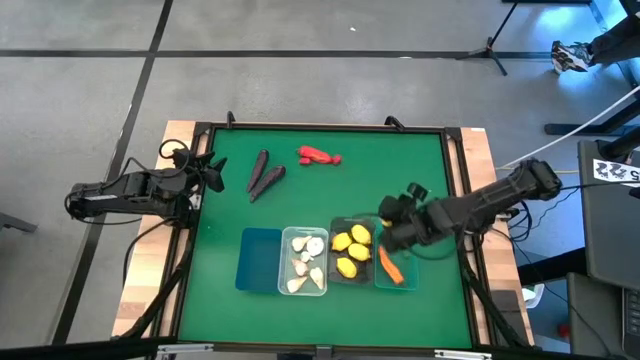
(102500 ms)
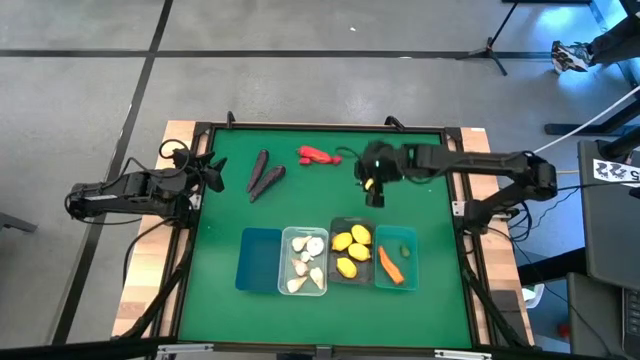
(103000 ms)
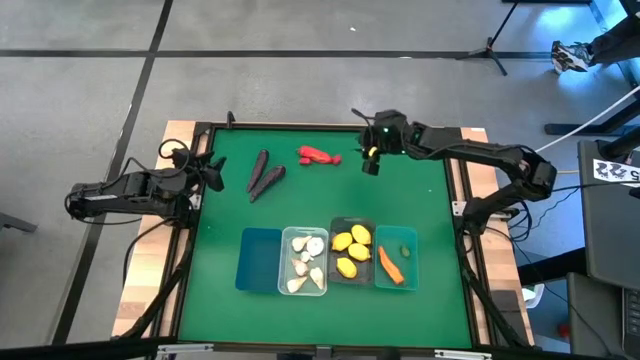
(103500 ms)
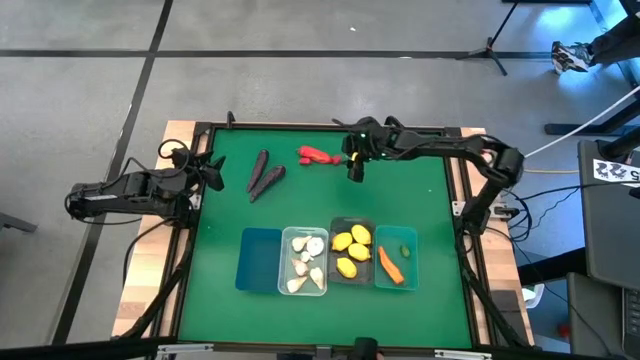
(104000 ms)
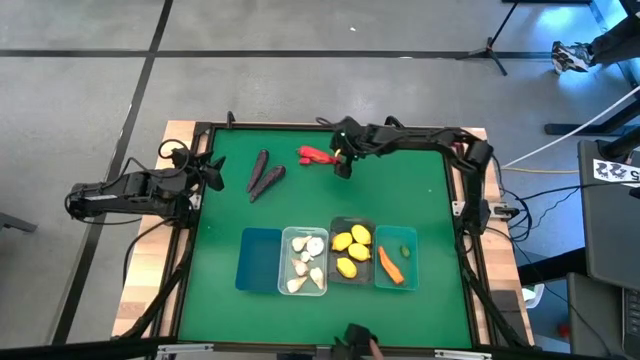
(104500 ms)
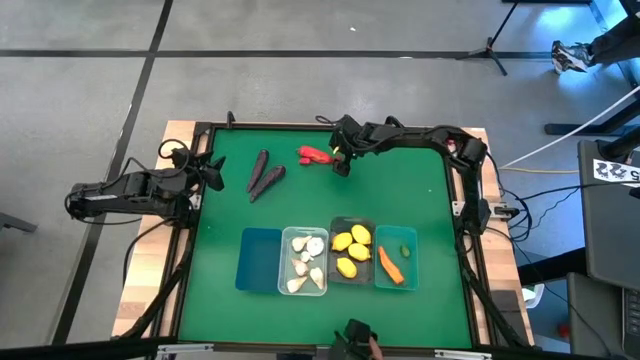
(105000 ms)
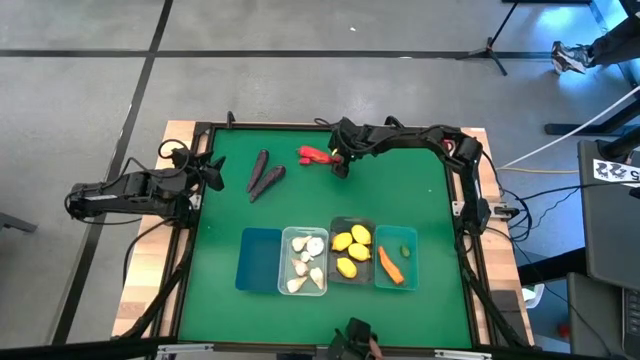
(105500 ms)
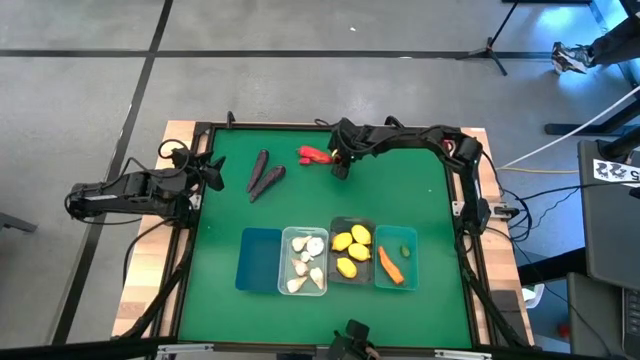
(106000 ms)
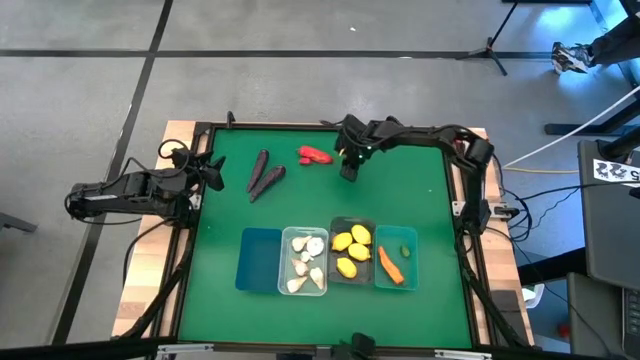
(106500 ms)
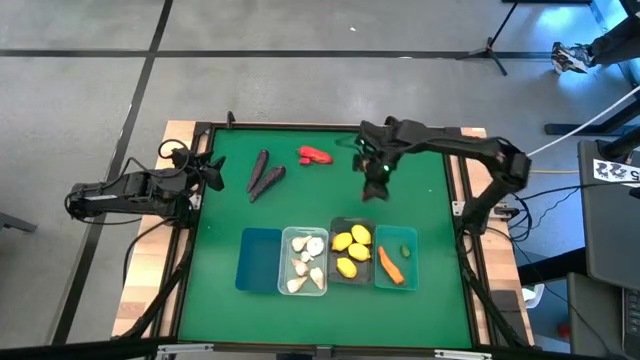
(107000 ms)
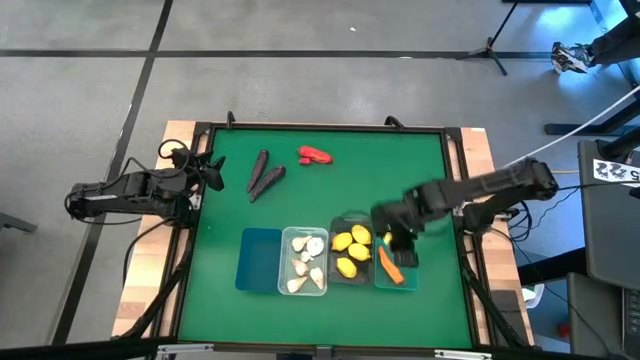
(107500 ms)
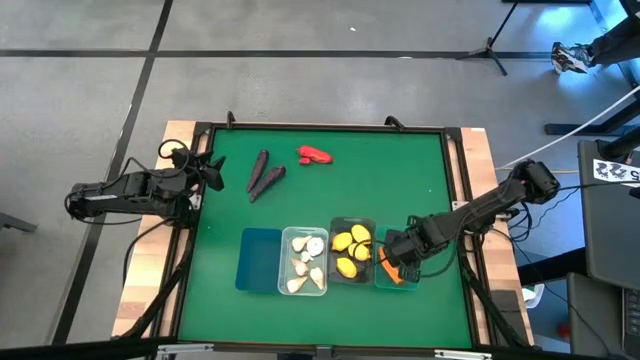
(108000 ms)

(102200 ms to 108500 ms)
Task: Sort produce into baskets
Put the red chili pepper into the light blue bin

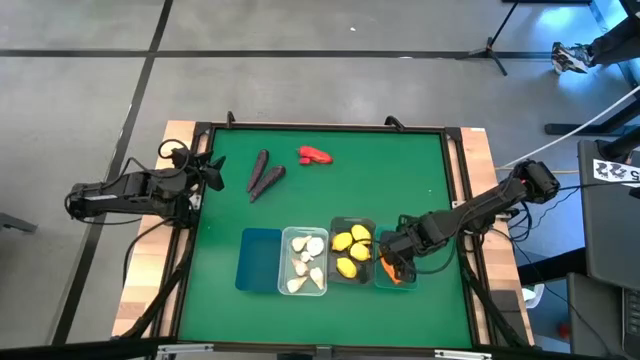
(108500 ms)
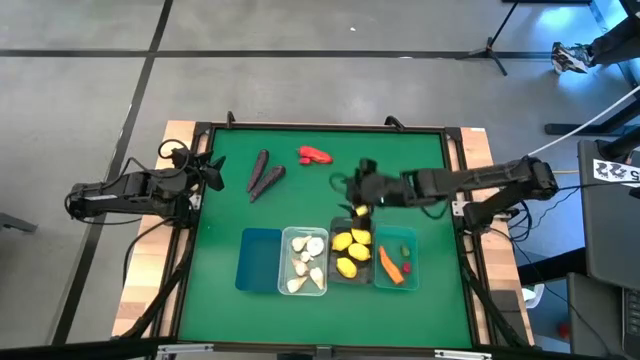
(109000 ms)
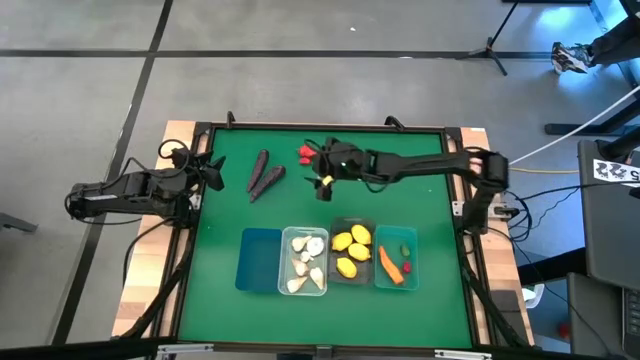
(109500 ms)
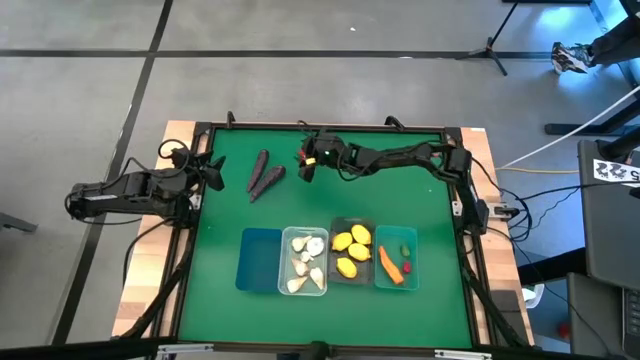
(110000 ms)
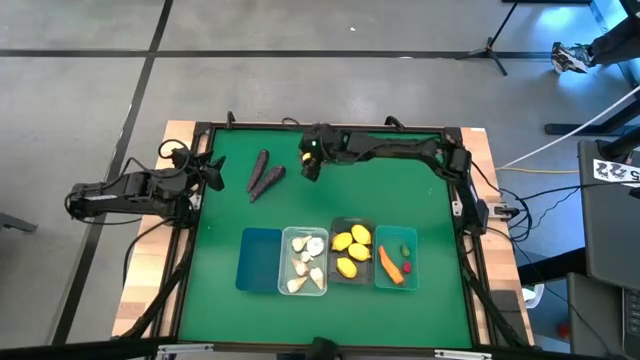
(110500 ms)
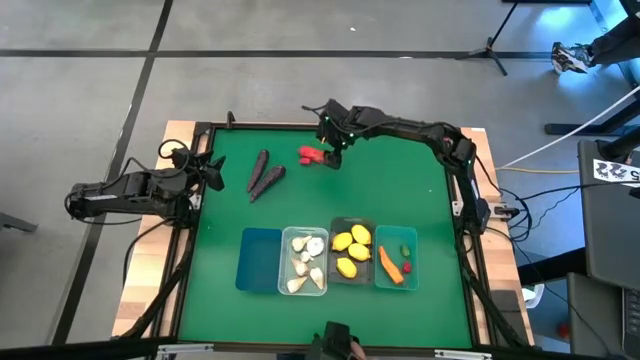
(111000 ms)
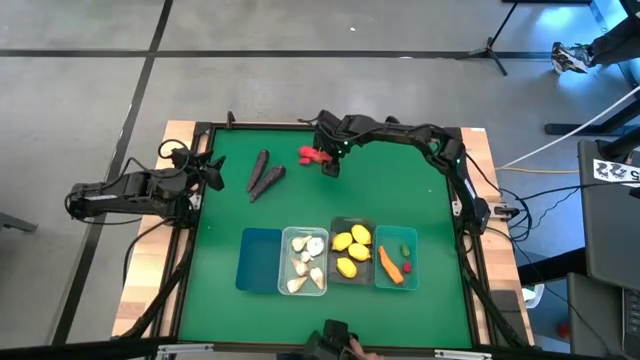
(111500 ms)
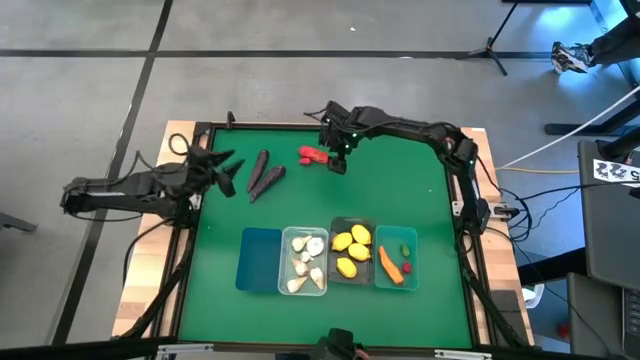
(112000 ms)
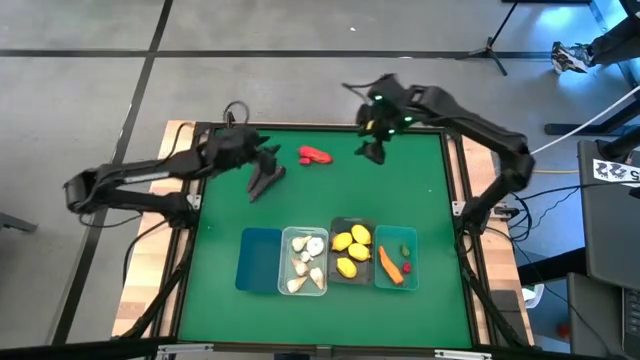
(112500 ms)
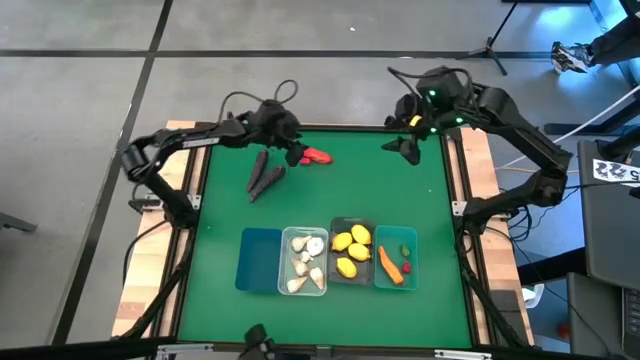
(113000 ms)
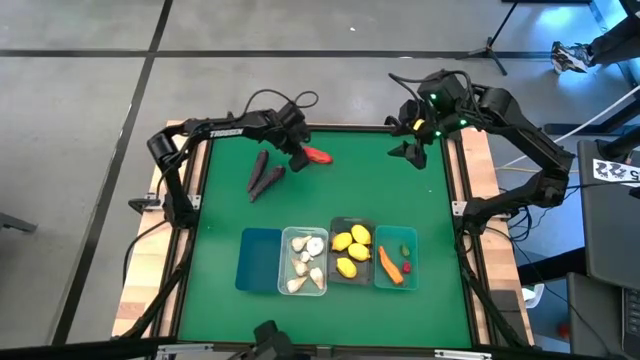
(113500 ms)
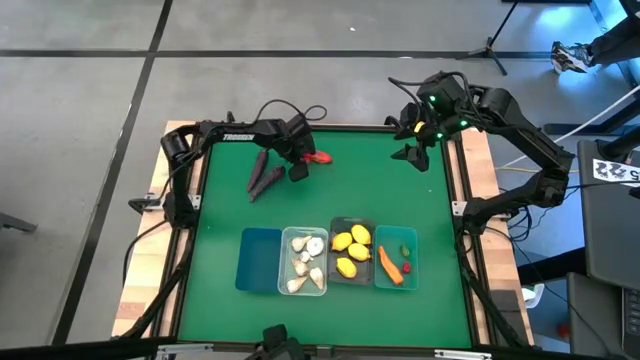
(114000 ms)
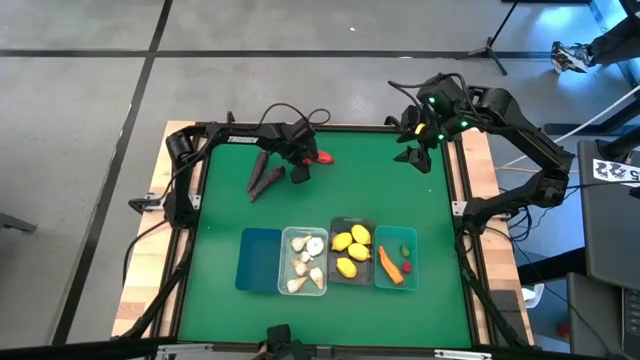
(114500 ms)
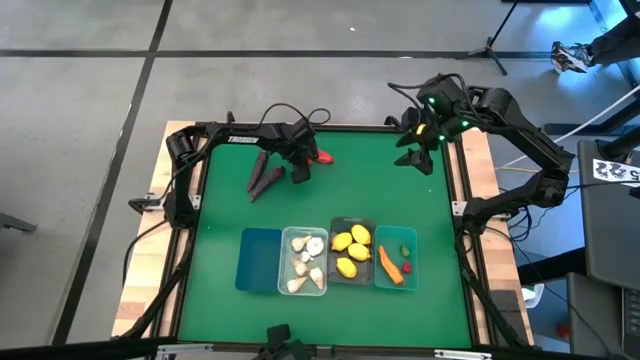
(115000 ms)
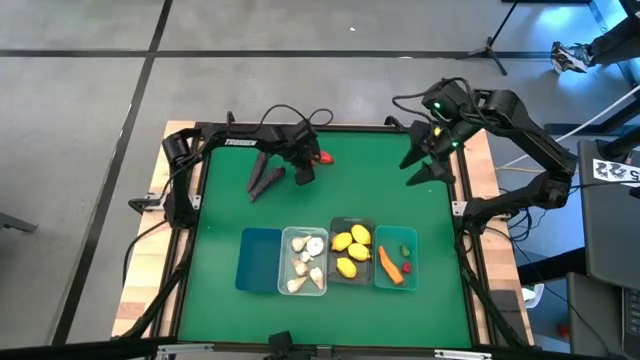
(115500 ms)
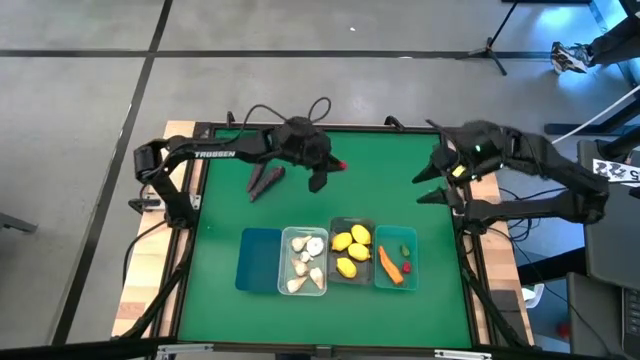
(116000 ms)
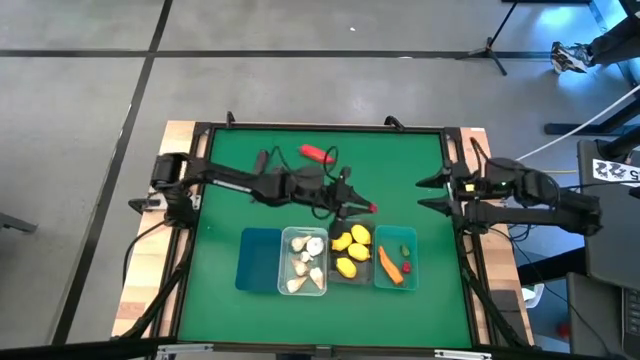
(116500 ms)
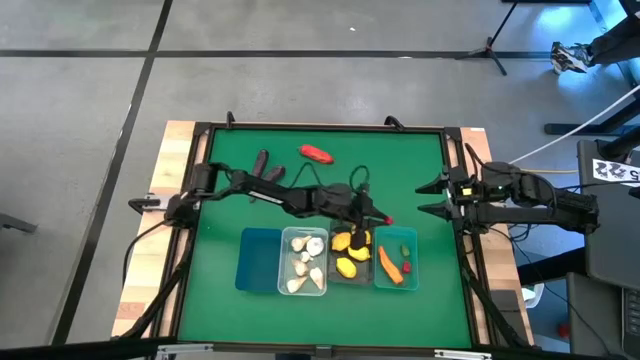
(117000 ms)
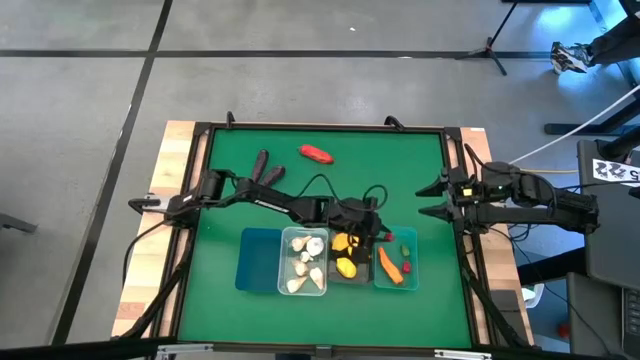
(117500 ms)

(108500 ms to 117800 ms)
Put the red chili pepper into the light blue bin

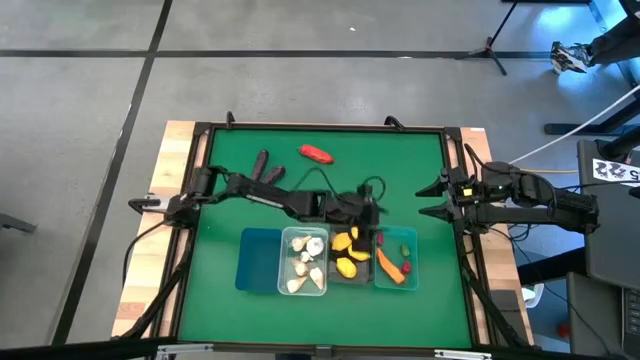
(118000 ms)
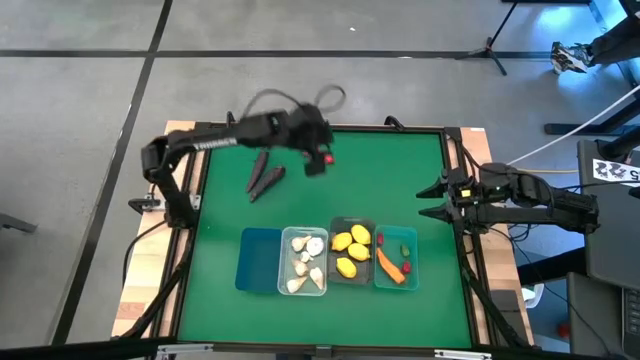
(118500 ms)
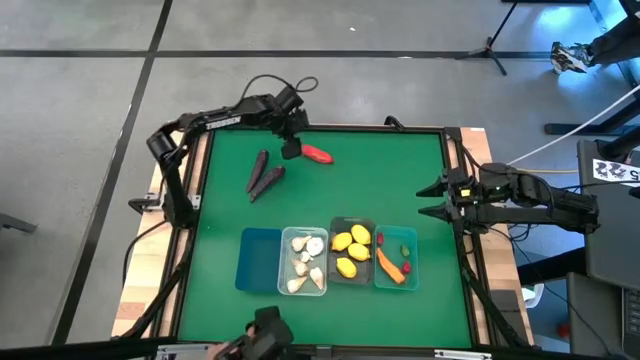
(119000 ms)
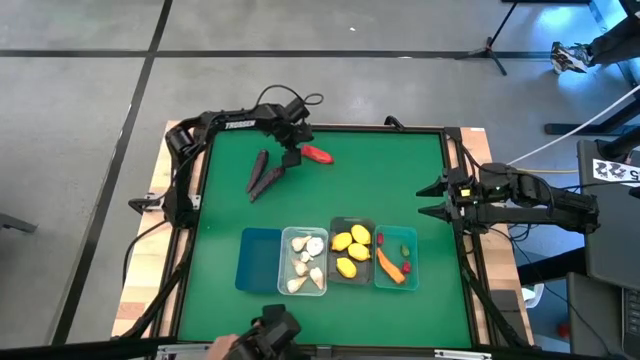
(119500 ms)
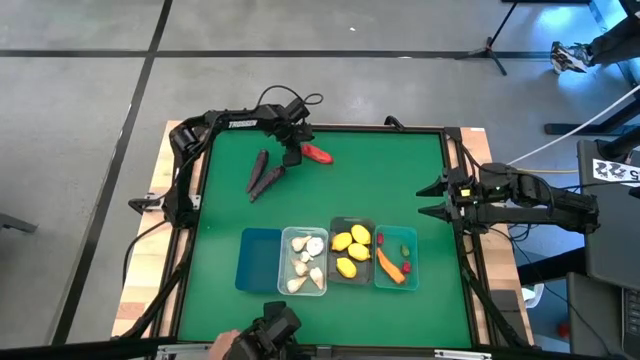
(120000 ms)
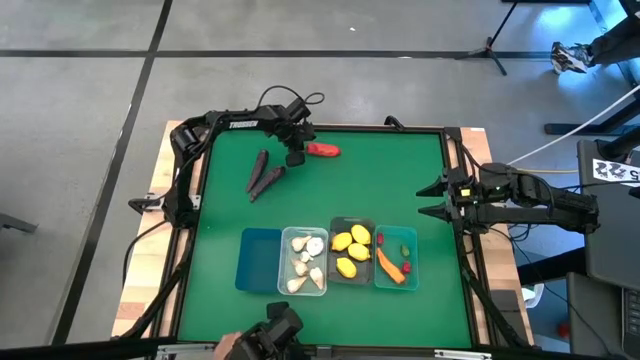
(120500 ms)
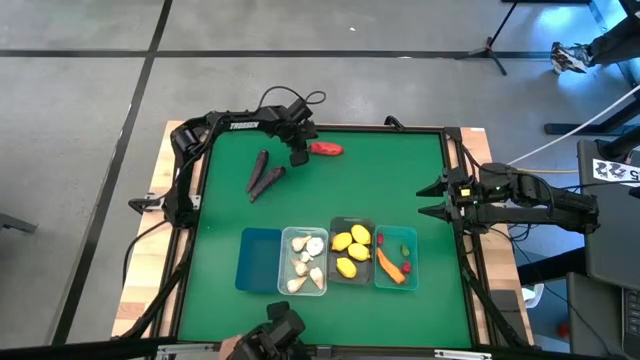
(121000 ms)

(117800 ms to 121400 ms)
Put the red chili pepper into the light blue bin
